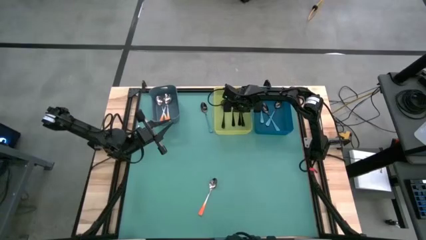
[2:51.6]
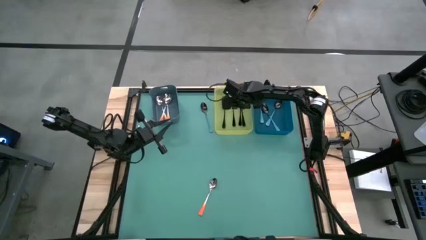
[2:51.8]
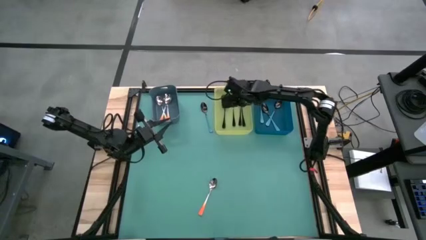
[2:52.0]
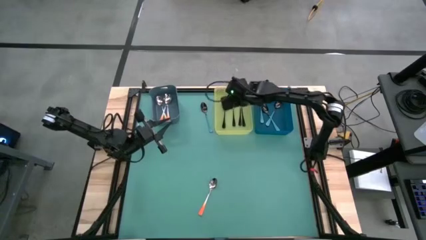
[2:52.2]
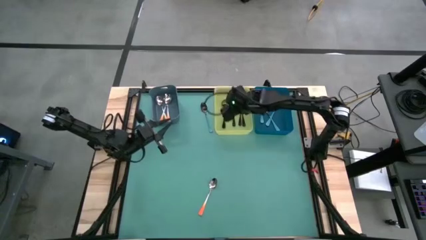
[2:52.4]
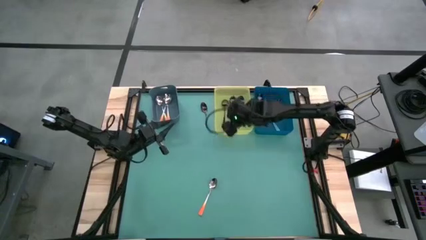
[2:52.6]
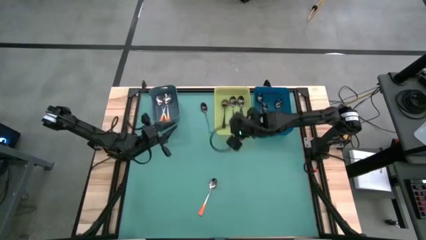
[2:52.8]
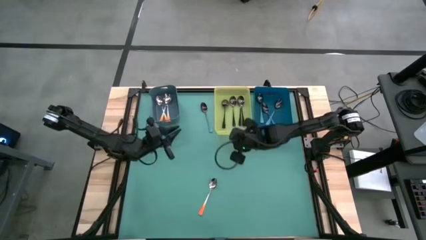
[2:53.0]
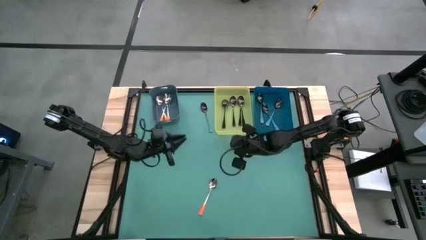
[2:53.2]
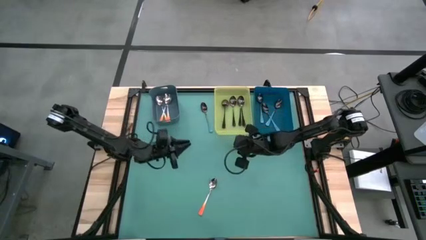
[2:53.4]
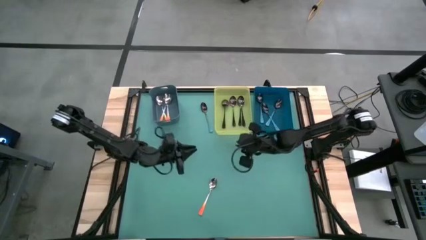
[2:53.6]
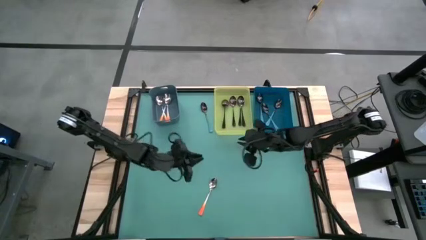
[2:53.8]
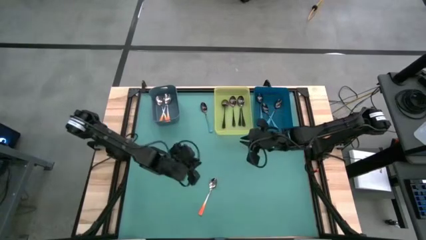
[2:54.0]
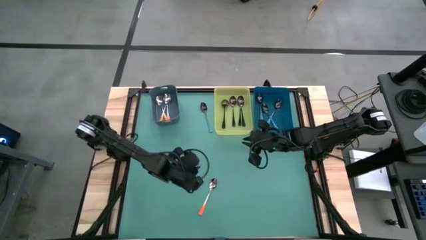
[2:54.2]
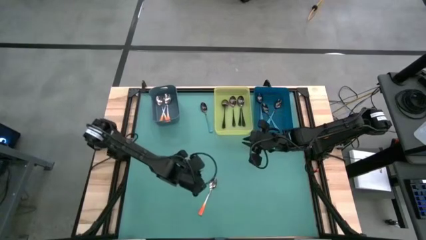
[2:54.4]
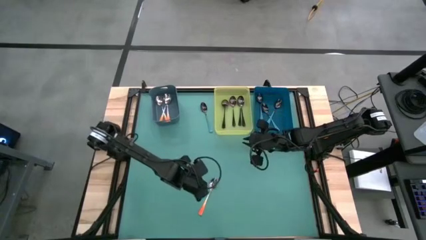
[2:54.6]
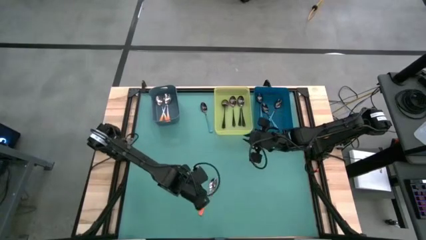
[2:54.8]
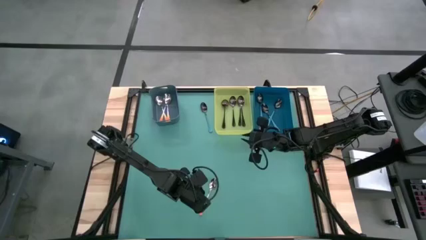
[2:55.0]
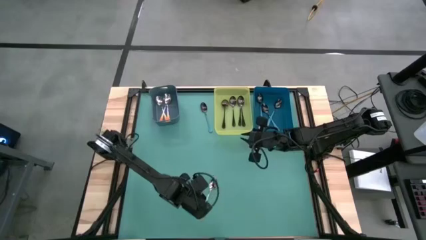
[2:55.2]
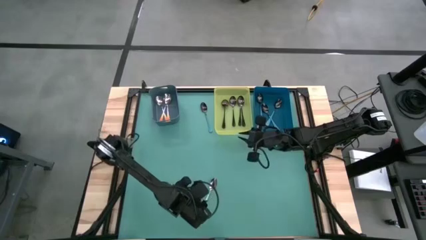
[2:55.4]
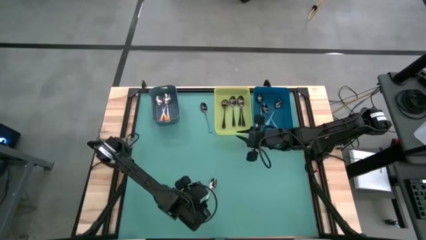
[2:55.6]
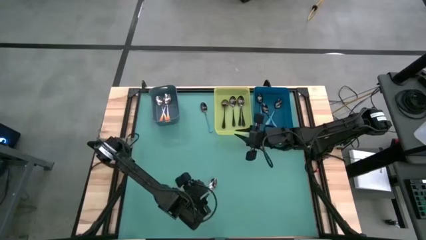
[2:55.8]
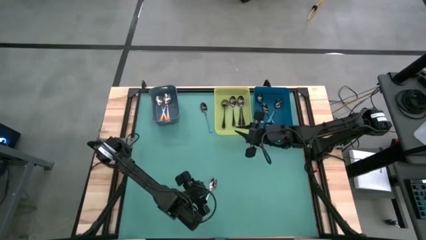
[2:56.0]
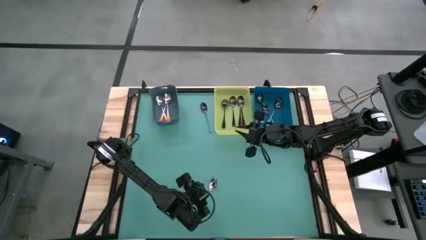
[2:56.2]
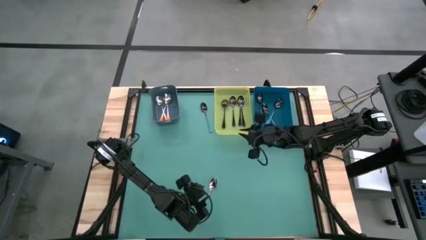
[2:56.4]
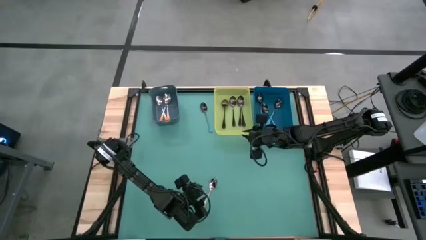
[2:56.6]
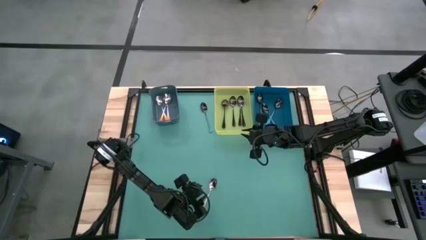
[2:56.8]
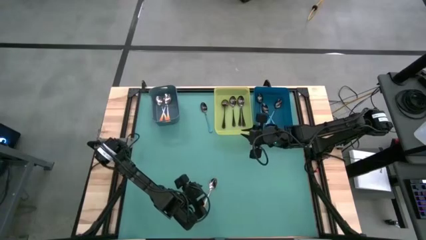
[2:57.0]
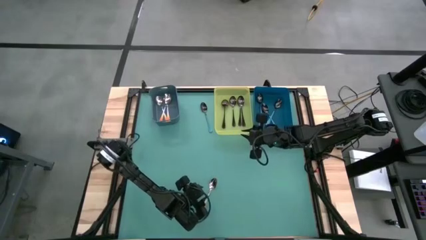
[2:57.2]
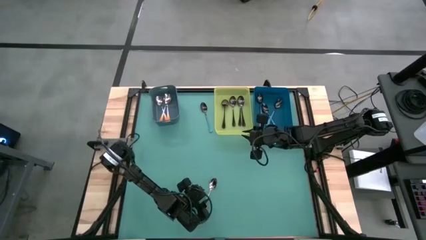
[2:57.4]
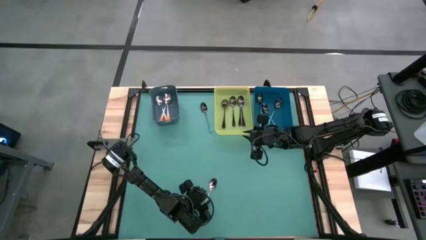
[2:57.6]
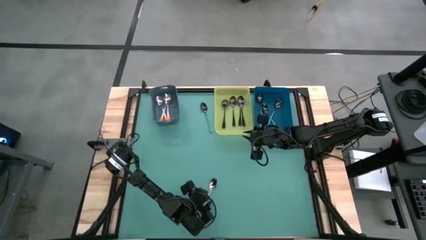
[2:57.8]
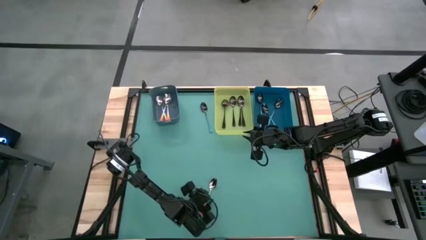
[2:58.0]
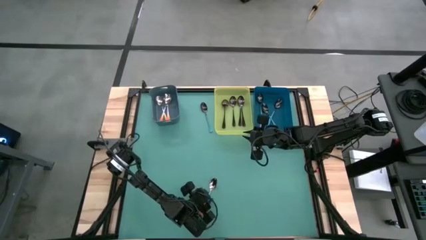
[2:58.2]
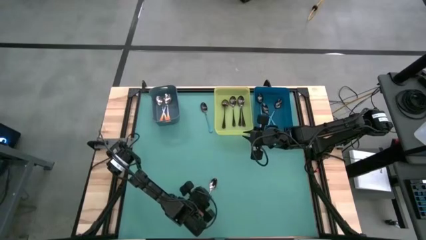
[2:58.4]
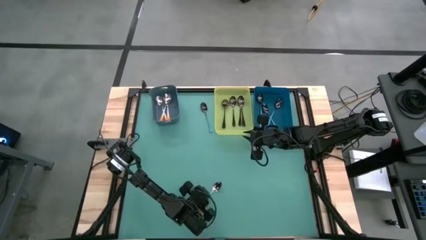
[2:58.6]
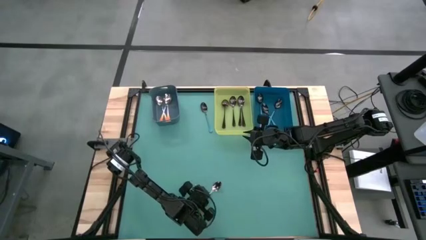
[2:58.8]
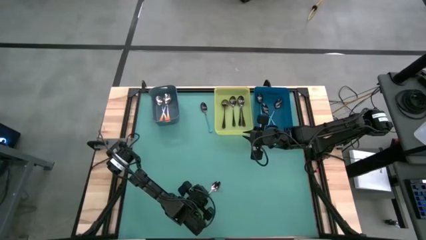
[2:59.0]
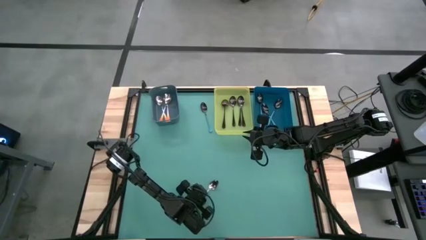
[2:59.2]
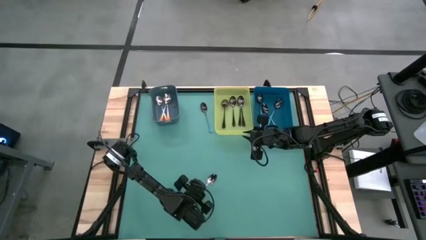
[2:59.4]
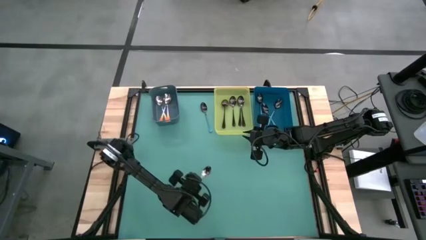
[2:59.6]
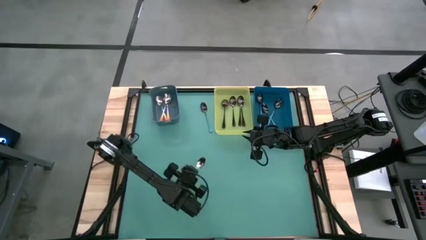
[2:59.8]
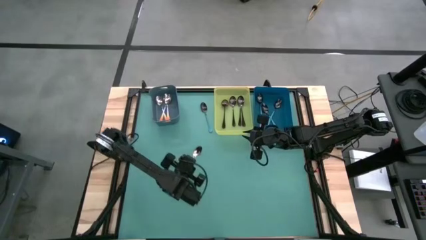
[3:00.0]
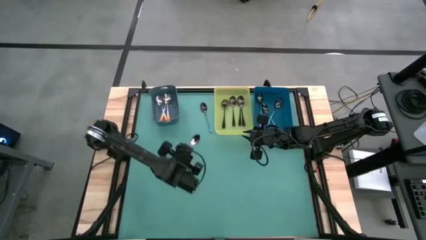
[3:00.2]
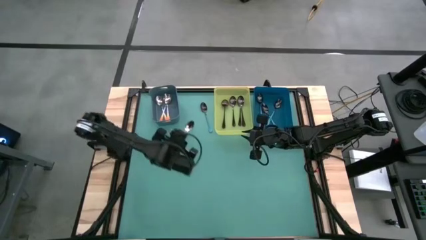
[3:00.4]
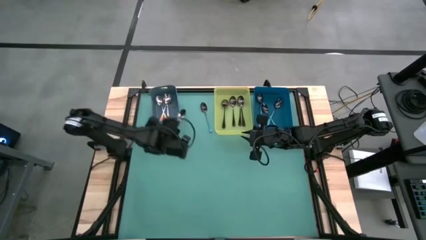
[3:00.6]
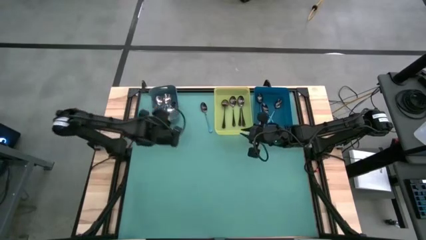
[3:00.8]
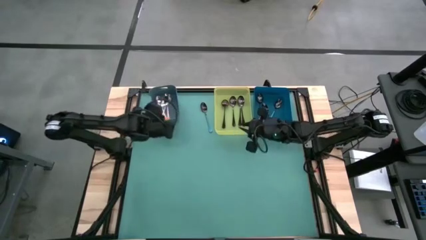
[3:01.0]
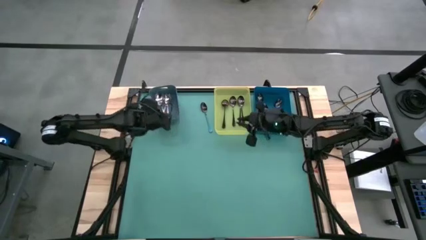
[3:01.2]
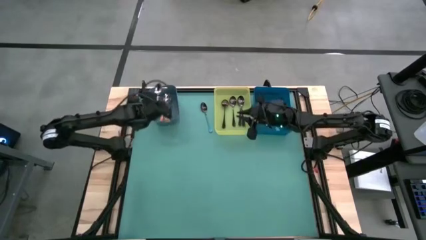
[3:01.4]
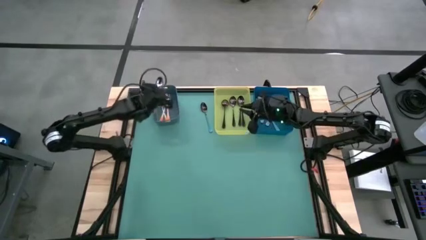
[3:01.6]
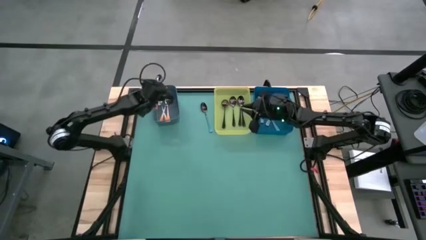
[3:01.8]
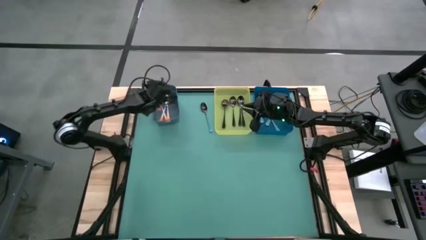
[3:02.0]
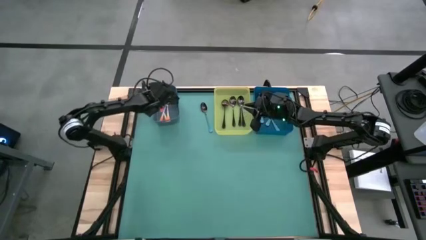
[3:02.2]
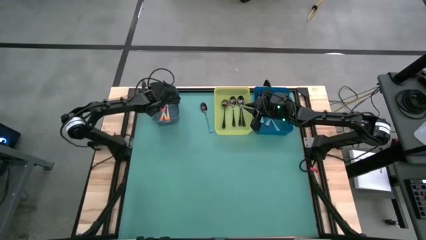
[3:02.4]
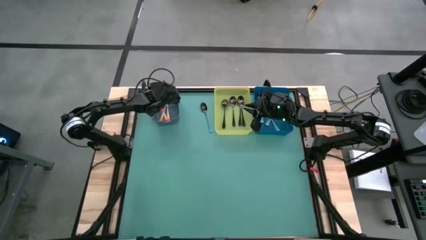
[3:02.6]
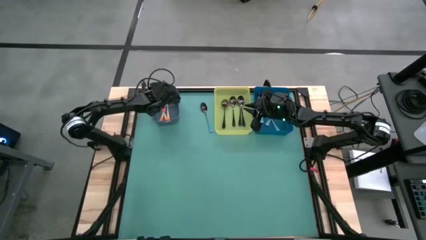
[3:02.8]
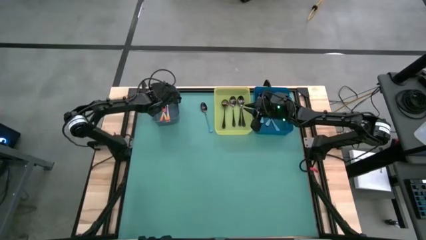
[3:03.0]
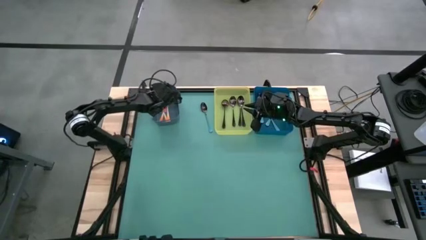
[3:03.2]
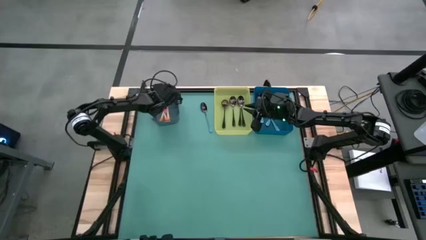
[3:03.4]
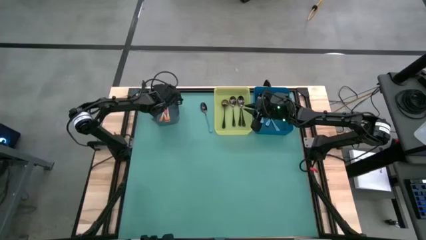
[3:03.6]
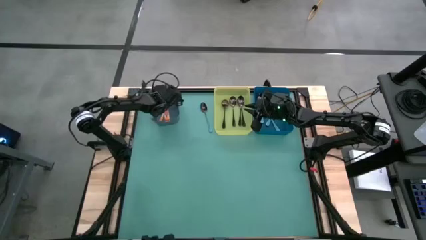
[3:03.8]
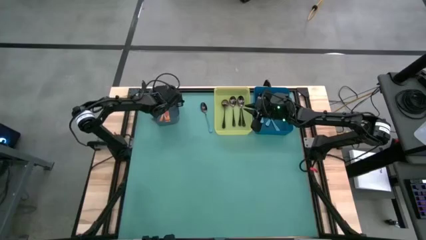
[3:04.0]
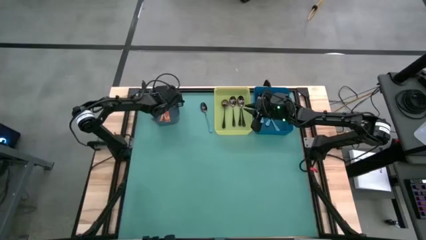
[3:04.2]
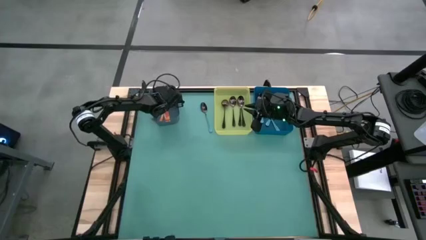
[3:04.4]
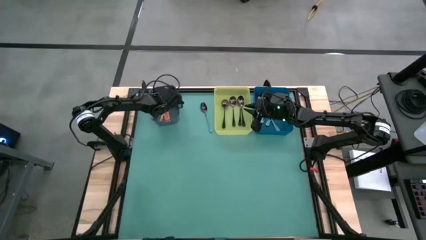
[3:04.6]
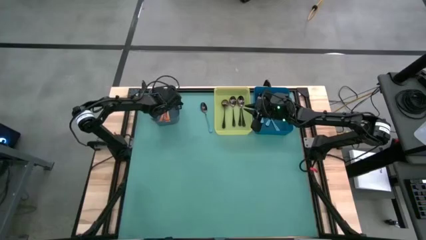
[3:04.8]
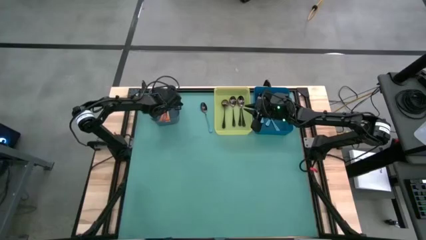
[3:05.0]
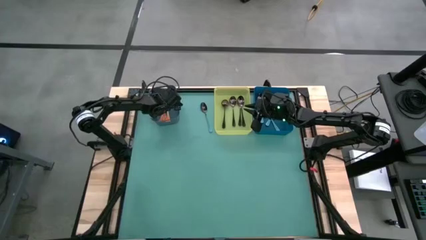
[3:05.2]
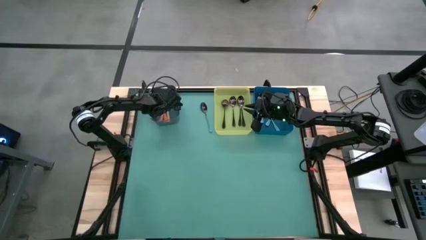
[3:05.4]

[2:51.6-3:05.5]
Task: Sort silverware by color (type)
Put the orange spoon into the green bin

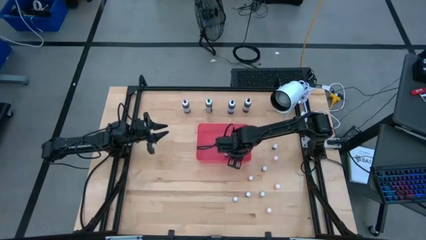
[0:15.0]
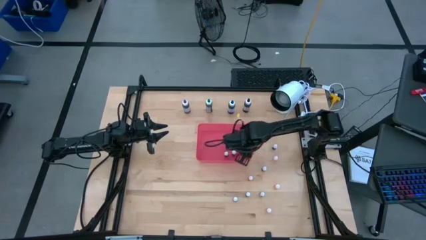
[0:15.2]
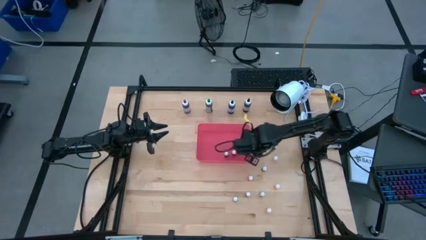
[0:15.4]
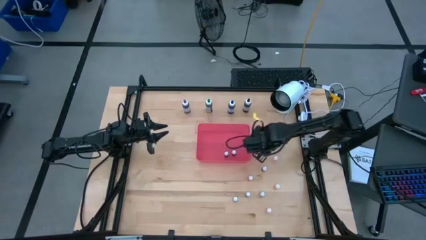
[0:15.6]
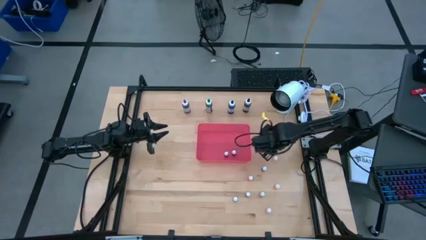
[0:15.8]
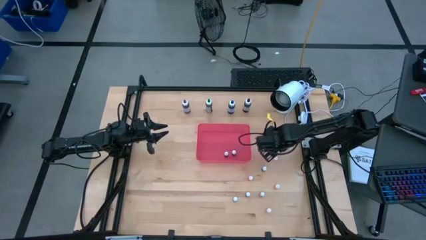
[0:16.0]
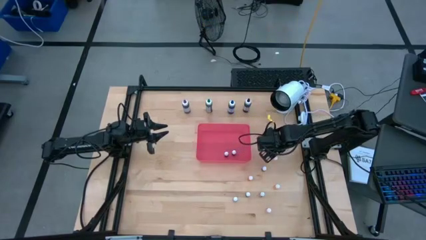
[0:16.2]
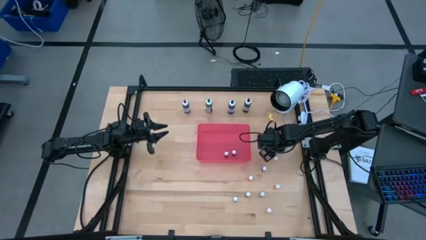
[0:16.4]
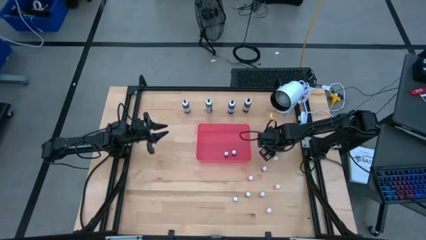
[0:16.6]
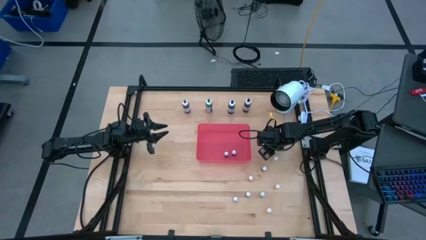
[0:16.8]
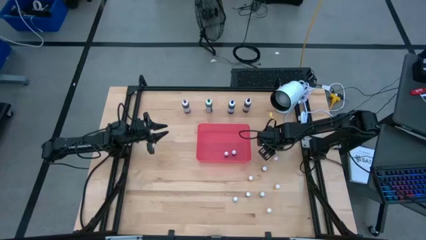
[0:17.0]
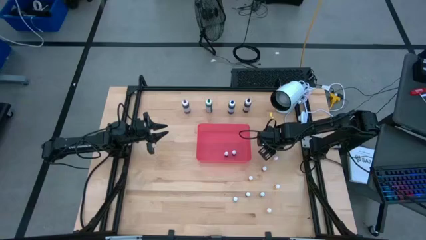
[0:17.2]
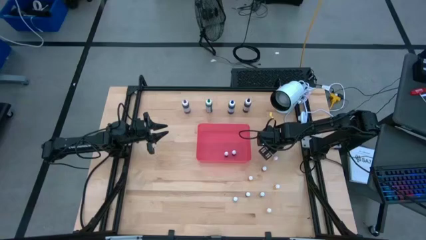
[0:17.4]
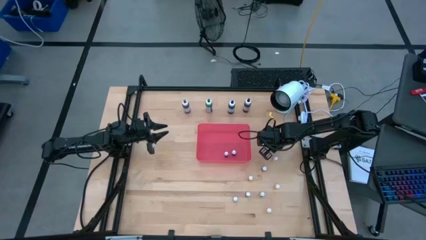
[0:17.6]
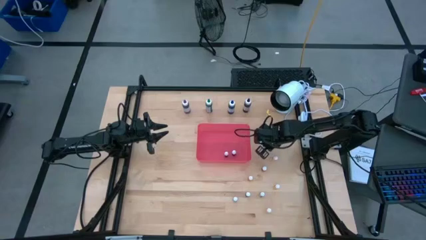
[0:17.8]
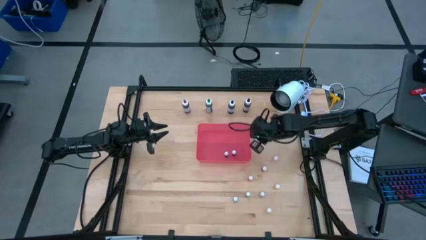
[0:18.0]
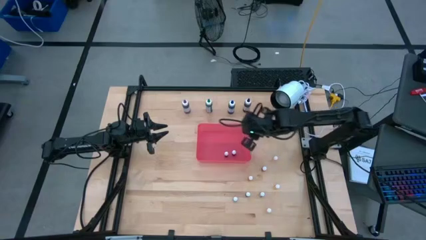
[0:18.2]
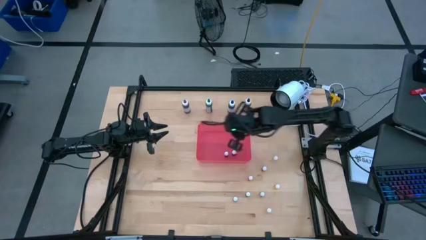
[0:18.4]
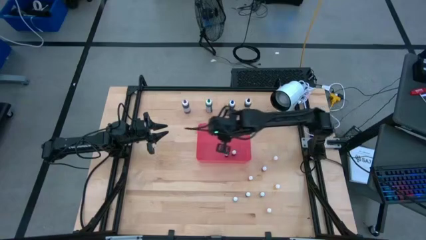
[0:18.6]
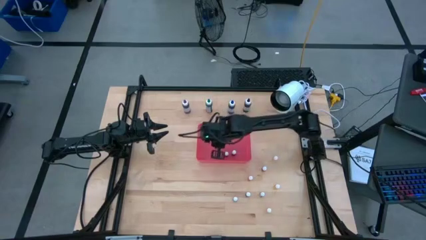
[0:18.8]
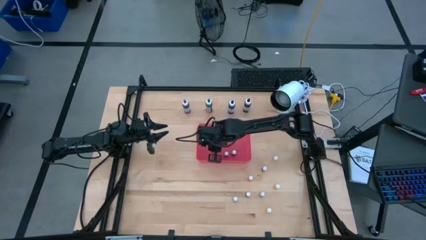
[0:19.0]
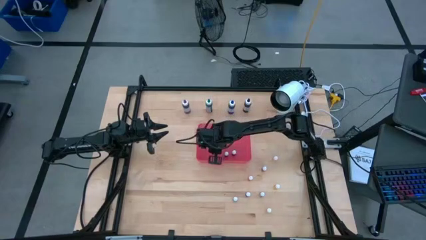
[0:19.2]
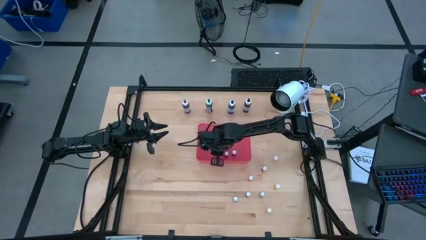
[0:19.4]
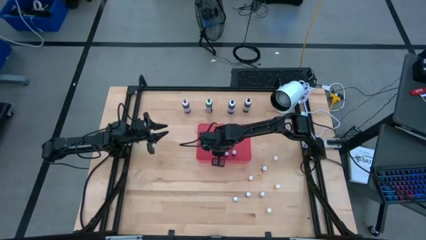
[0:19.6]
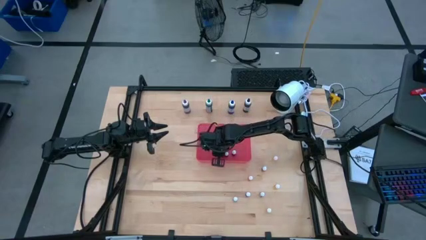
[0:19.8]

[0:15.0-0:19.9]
Task: Pick & Place food coloring
Put the small blue food coloring bottle into the red bin
